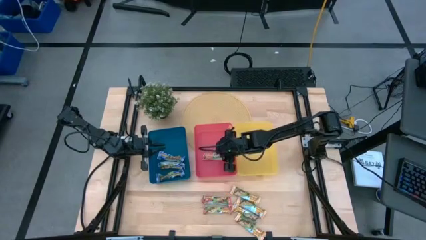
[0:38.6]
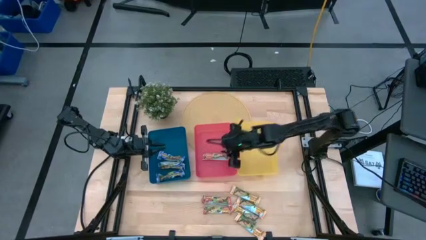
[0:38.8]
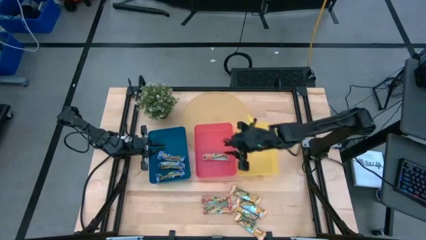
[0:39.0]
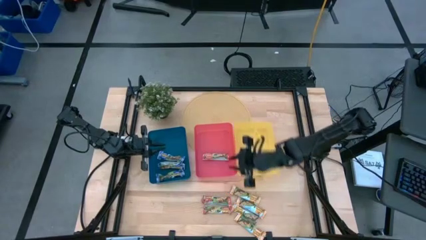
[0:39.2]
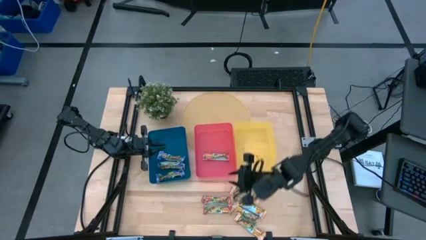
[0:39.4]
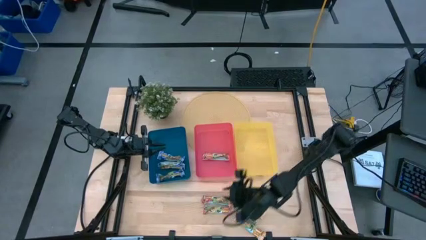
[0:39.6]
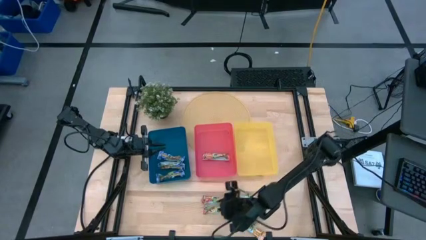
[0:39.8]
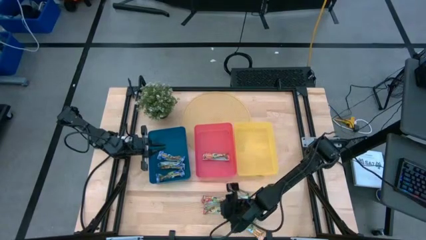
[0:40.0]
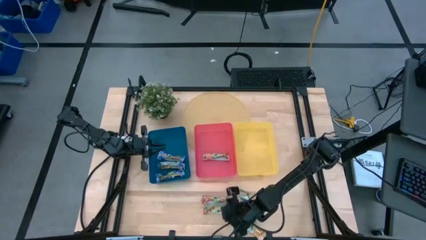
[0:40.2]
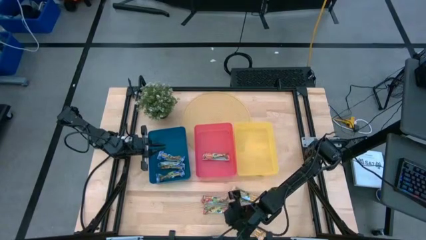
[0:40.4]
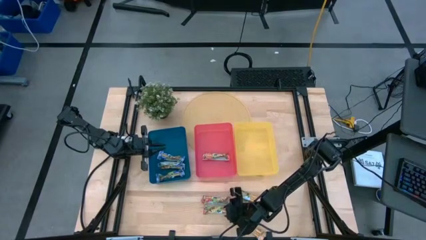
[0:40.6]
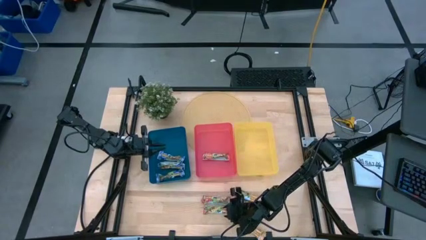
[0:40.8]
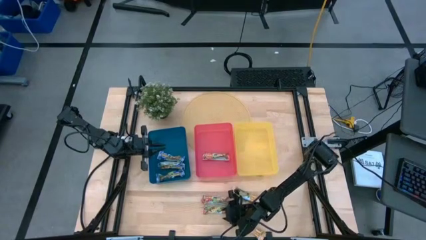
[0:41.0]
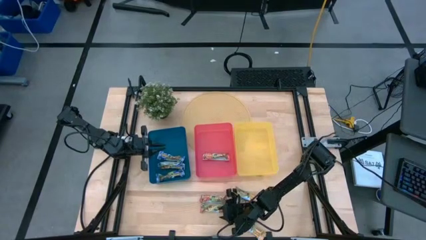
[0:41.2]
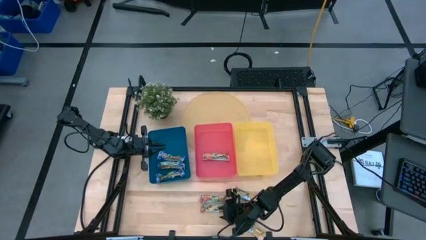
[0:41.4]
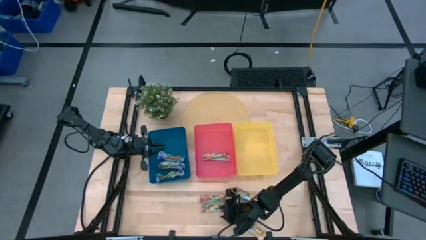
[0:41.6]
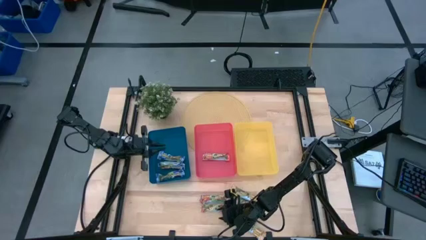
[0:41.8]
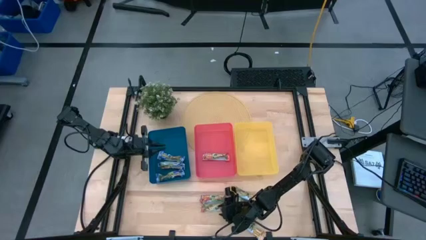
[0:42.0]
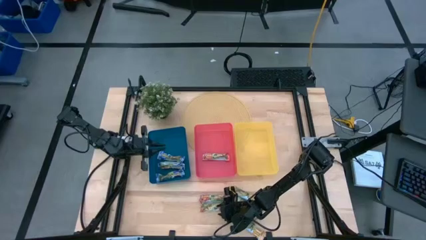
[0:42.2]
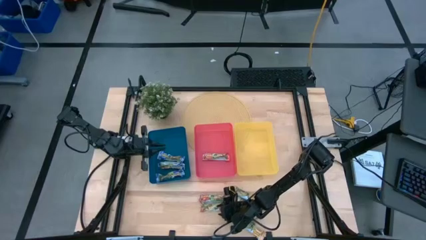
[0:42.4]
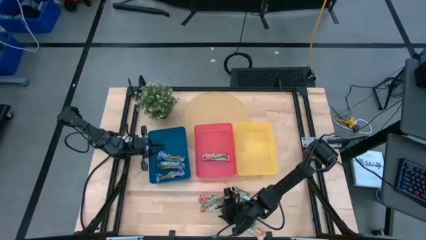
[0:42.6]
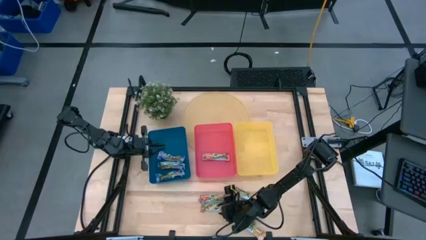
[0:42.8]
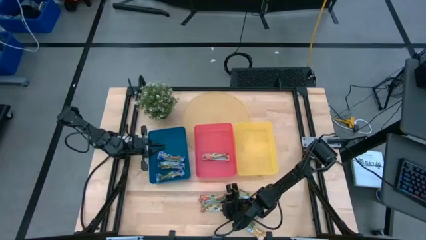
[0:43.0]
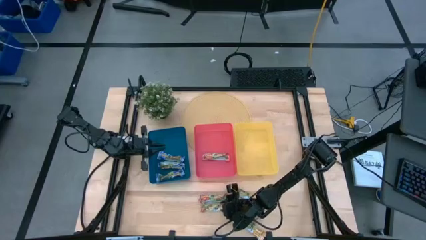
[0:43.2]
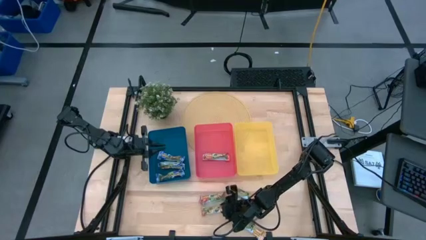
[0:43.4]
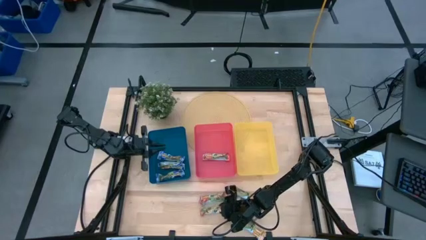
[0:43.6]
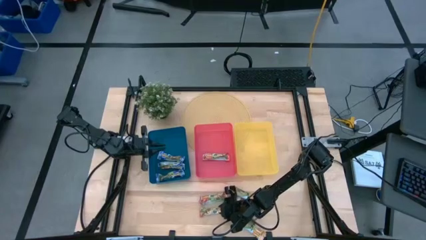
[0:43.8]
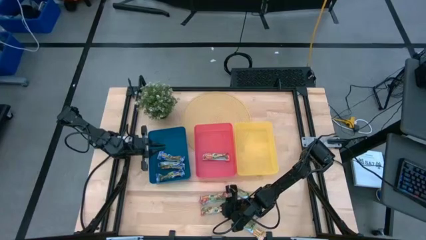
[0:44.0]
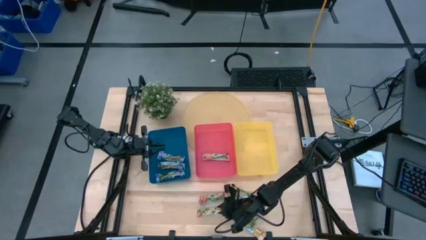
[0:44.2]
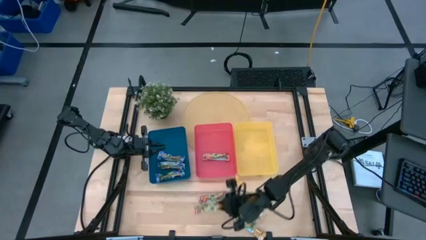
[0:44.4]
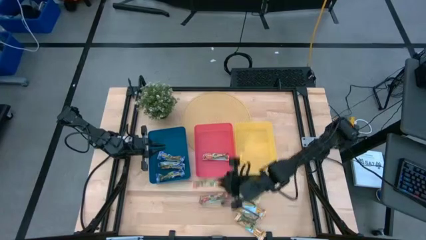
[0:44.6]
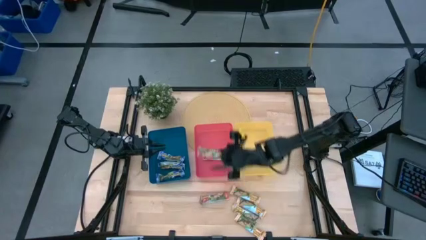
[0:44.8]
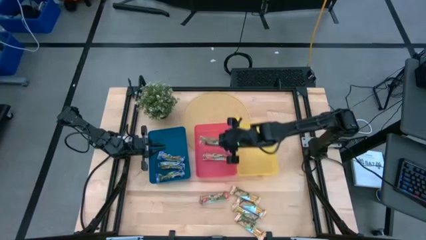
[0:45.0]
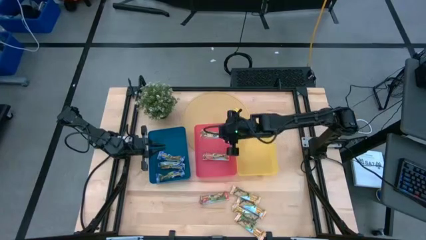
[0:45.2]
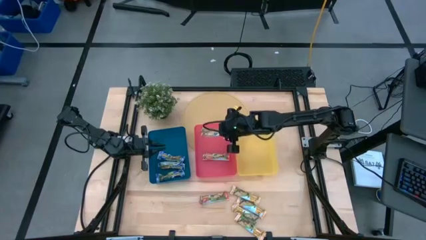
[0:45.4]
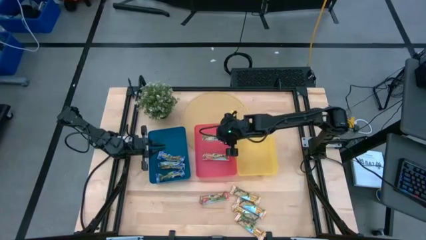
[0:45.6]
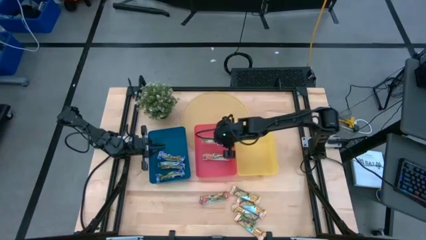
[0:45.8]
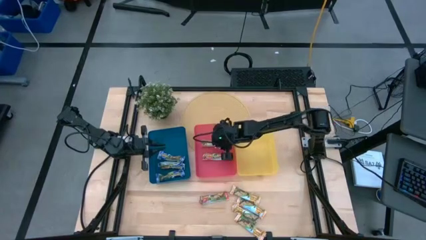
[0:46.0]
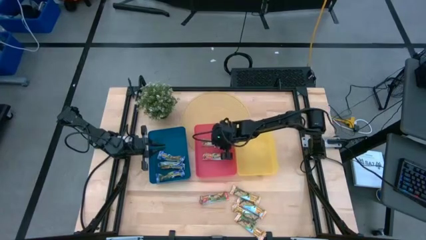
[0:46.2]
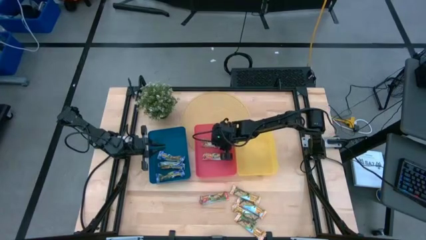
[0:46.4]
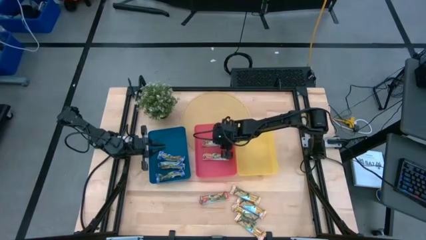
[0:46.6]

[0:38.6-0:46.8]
Task: Pick and place Granola Bars by type
Put the red granola bar into the pink bin

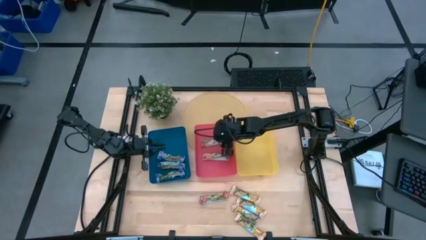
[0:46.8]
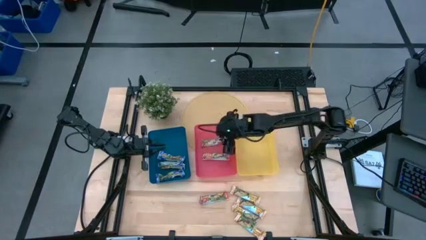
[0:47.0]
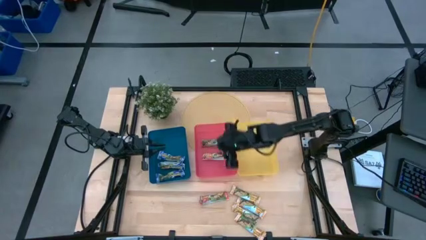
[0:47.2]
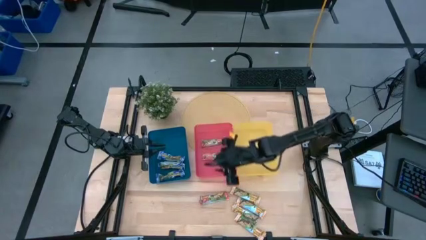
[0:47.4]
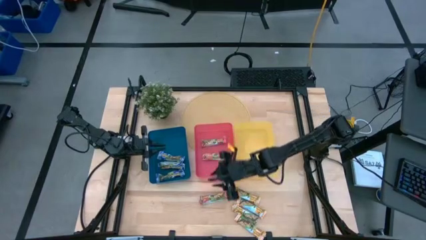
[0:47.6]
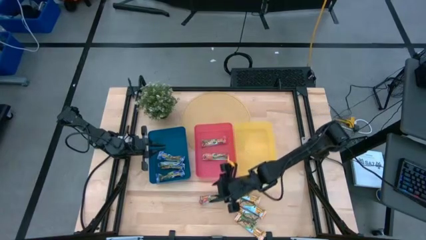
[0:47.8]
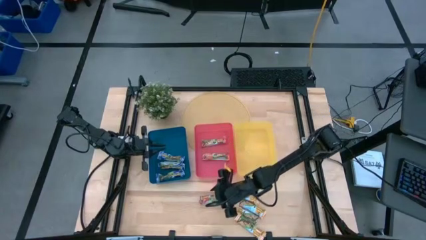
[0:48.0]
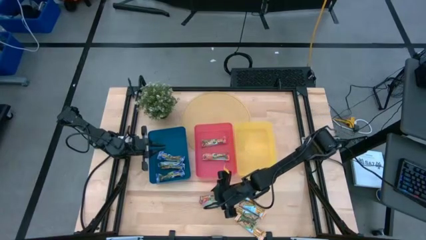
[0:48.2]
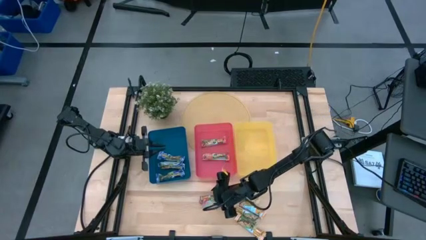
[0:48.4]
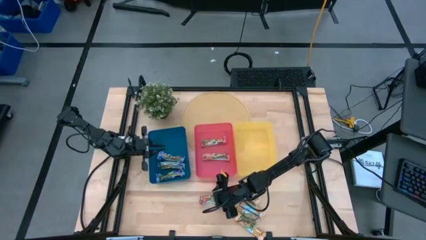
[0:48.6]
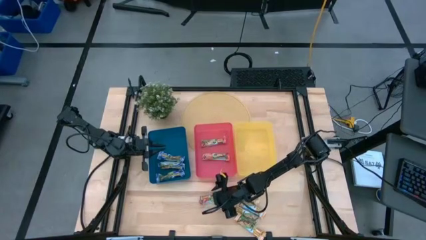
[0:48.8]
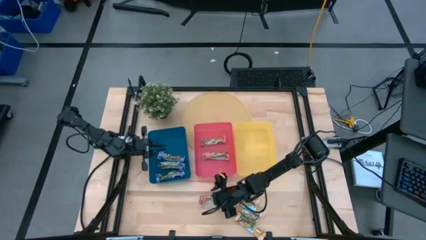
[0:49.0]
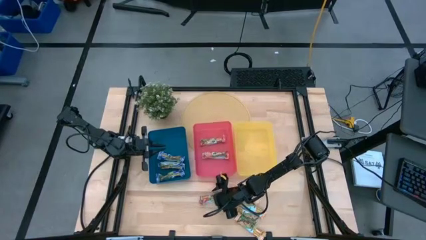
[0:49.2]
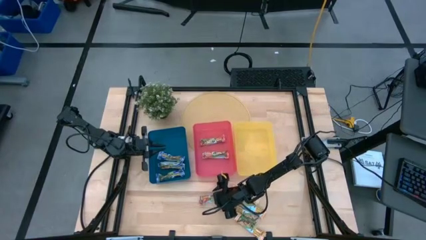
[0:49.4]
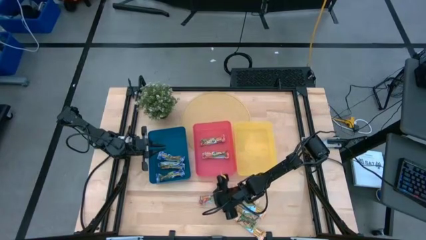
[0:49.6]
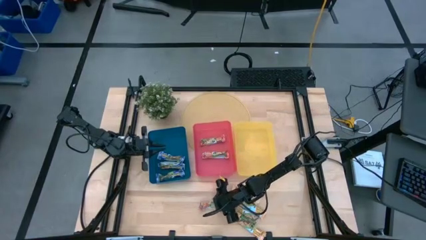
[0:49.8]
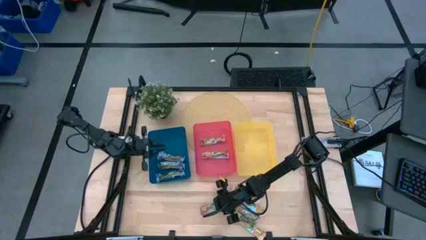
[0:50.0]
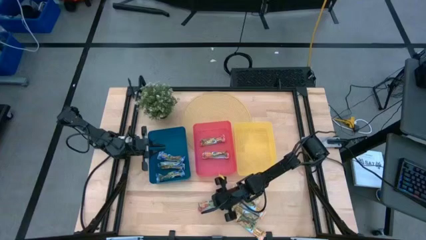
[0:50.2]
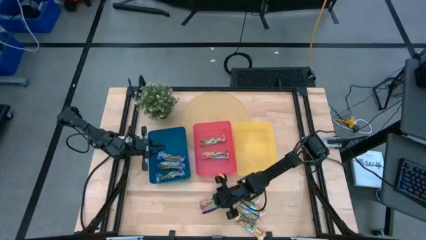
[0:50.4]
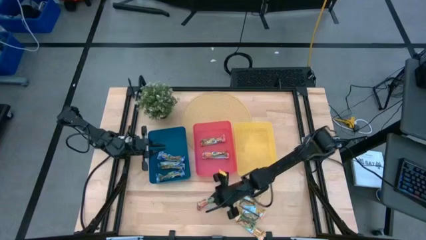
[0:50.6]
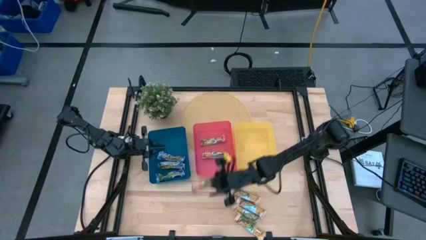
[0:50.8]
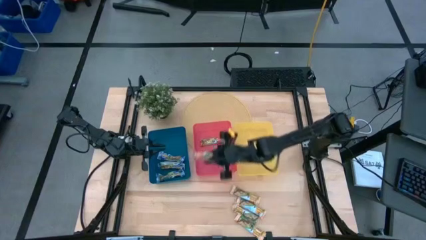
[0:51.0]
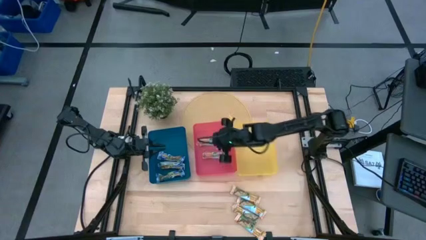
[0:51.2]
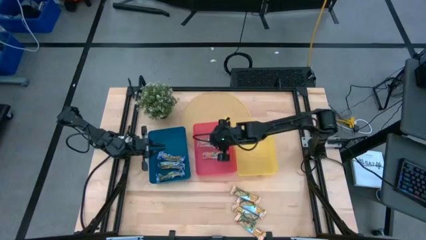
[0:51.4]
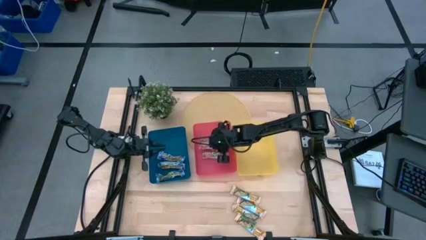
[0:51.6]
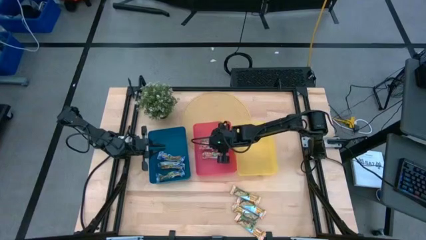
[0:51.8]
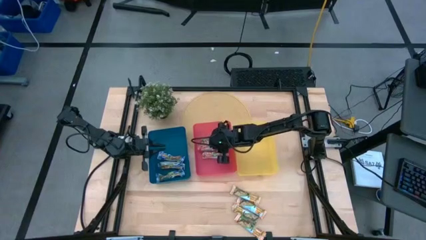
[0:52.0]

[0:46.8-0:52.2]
Put the red granola bar into the pink bin

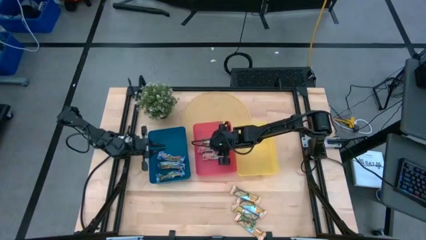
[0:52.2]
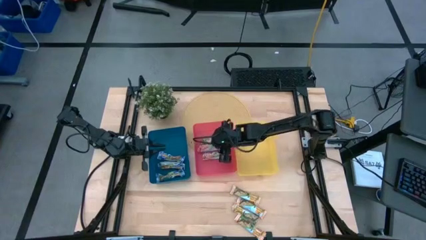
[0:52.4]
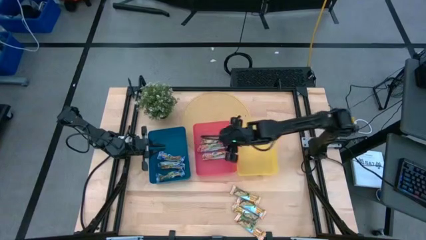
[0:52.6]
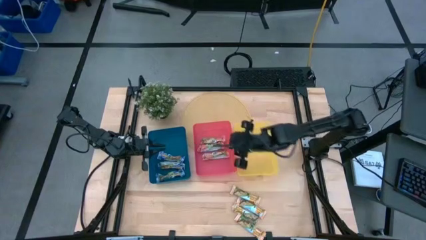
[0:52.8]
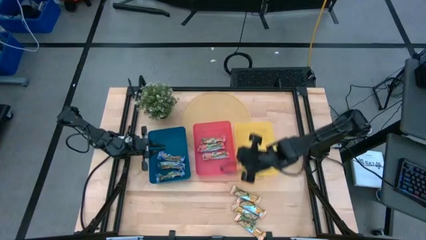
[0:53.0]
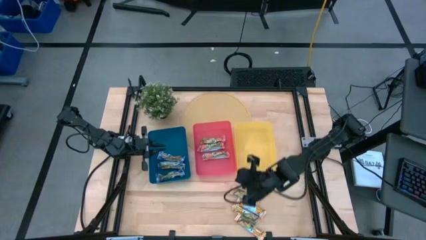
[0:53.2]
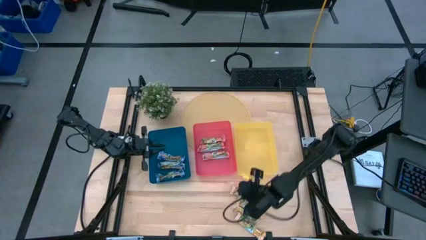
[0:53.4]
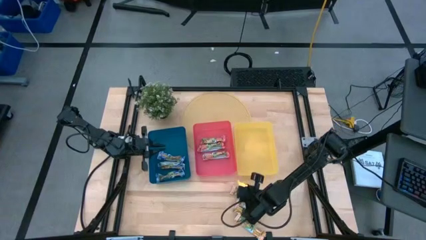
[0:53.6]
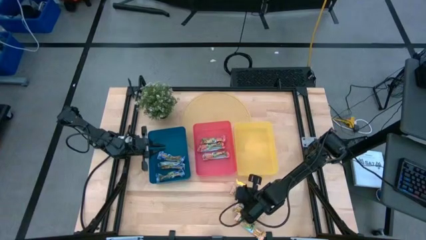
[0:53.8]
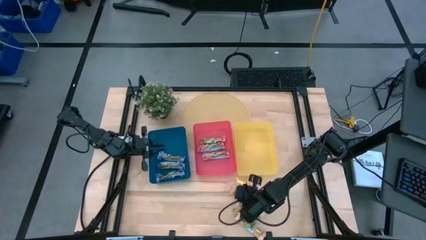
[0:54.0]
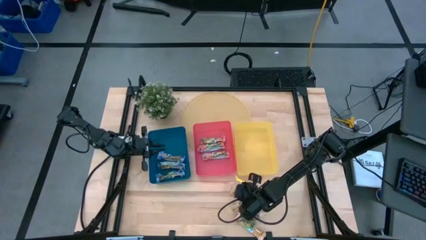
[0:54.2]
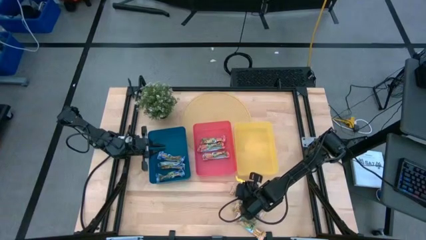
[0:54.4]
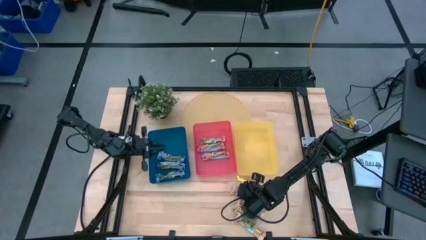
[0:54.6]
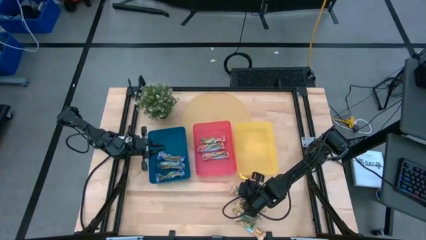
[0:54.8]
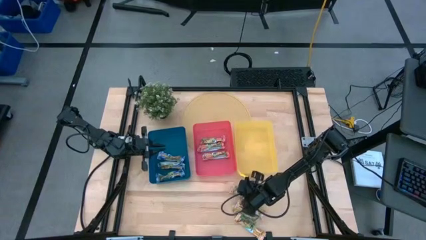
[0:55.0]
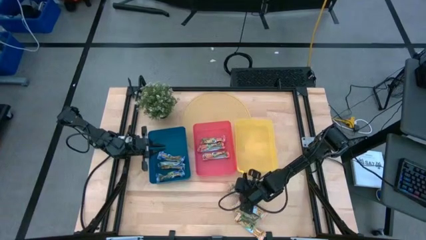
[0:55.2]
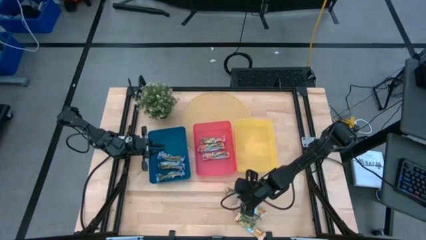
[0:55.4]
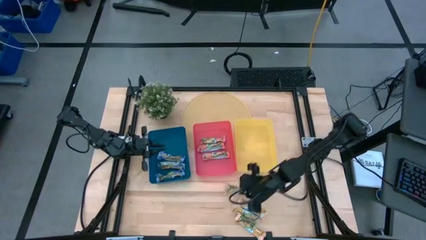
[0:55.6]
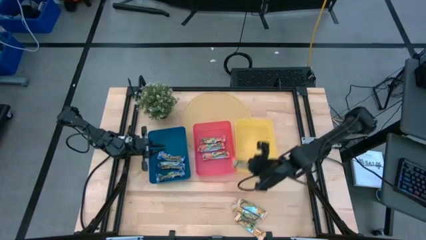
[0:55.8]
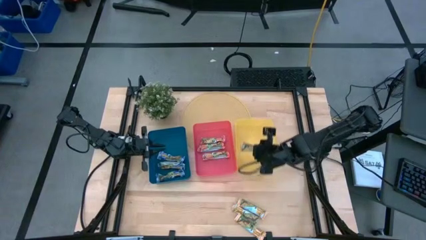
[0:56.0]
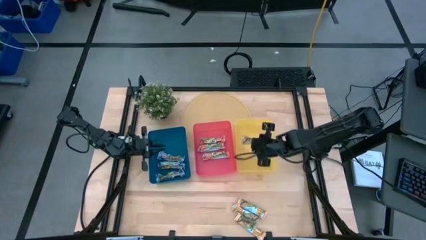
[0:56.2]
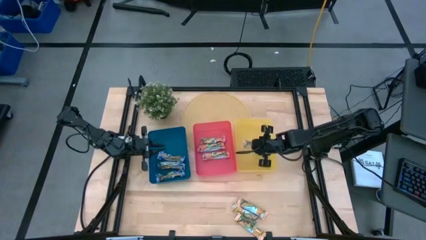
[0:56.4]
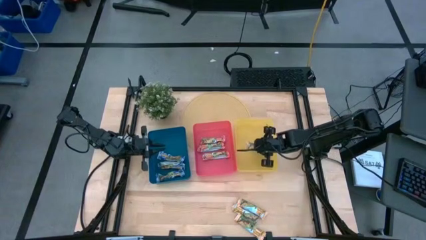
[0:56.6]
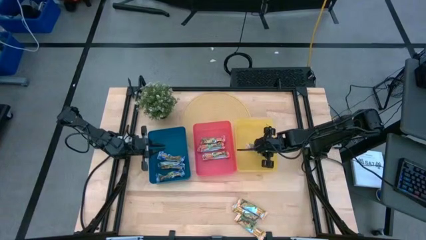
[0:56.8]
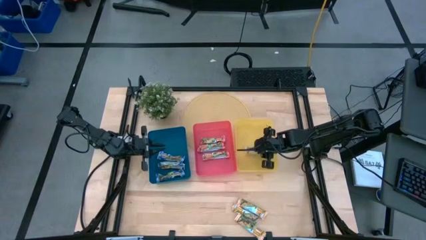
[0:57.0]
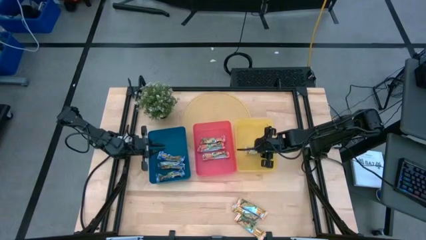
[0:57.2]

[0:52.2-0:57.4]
Put the yellow granola bar into the yellow bin
